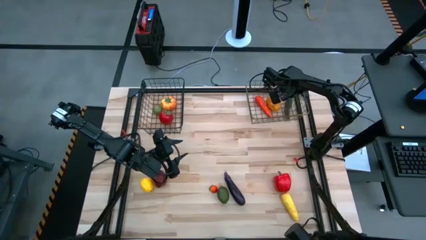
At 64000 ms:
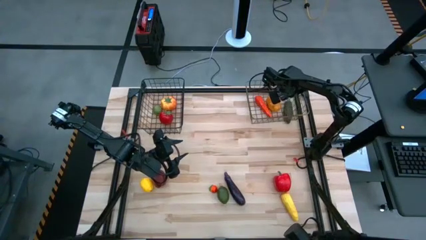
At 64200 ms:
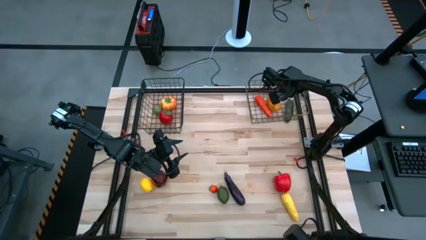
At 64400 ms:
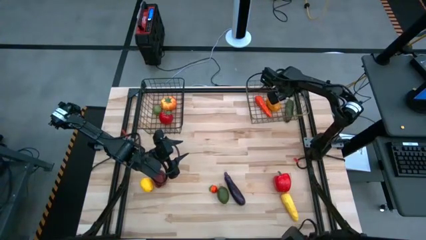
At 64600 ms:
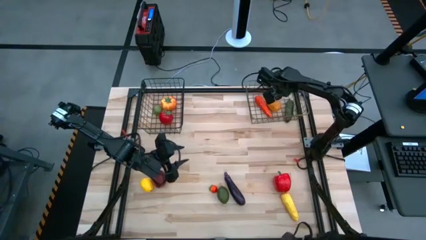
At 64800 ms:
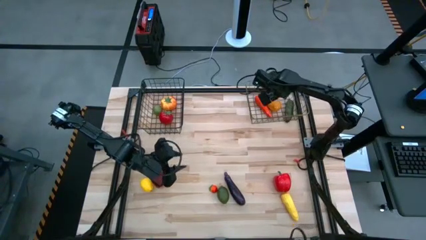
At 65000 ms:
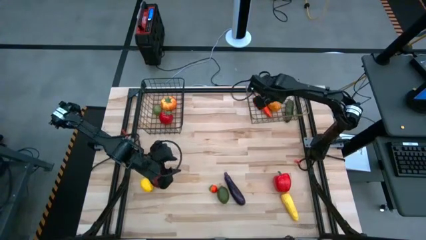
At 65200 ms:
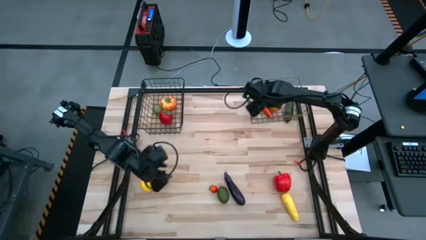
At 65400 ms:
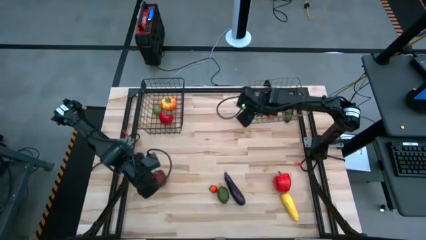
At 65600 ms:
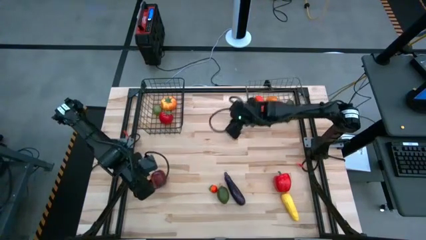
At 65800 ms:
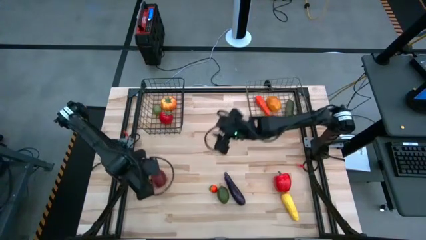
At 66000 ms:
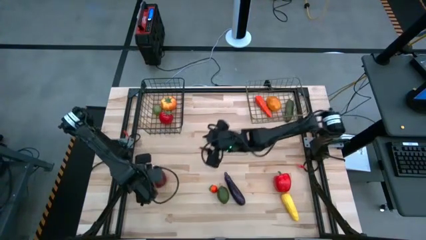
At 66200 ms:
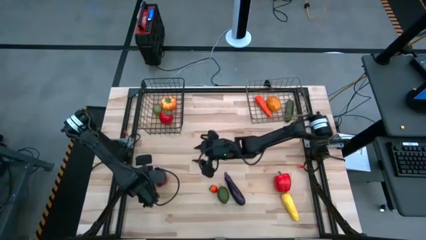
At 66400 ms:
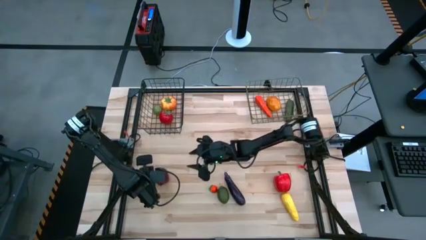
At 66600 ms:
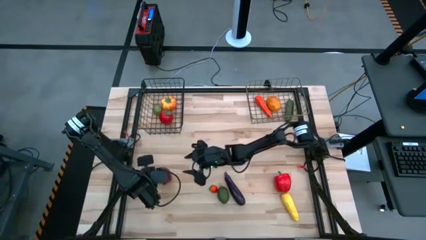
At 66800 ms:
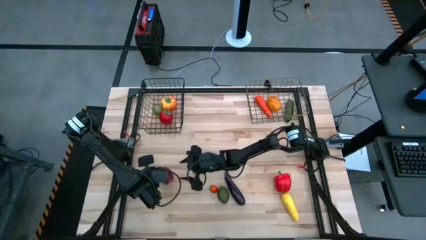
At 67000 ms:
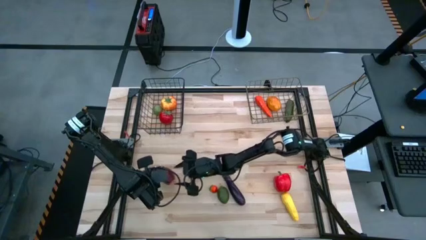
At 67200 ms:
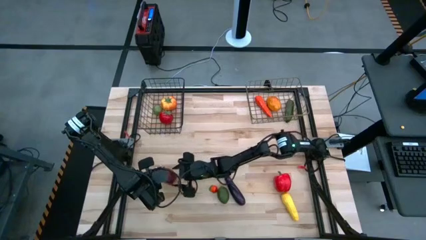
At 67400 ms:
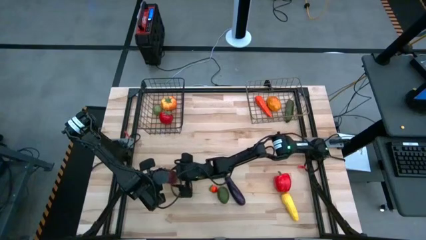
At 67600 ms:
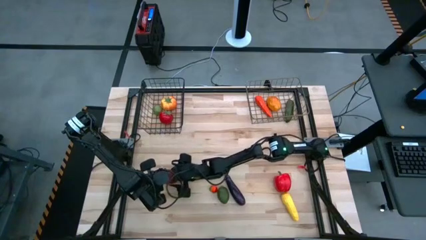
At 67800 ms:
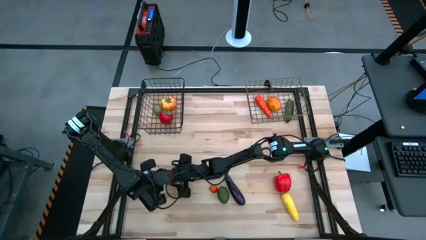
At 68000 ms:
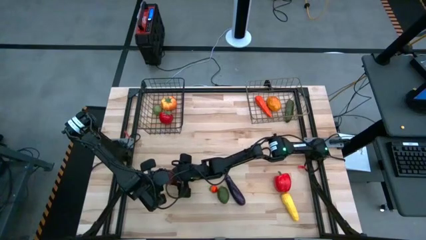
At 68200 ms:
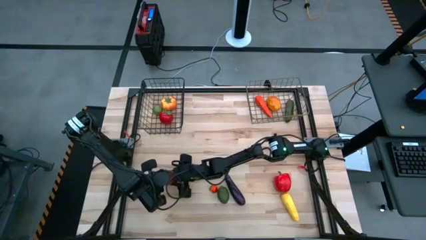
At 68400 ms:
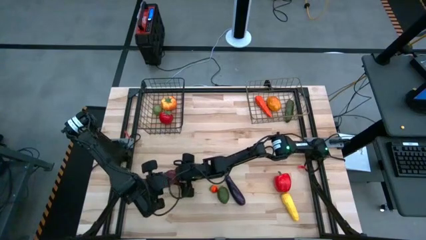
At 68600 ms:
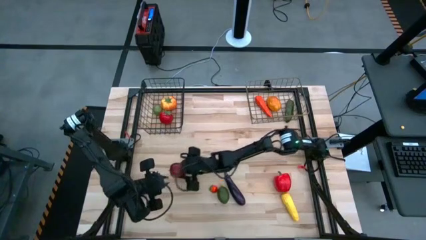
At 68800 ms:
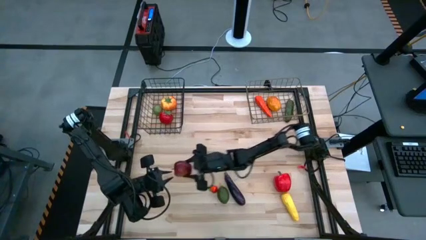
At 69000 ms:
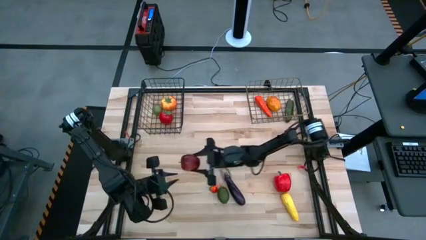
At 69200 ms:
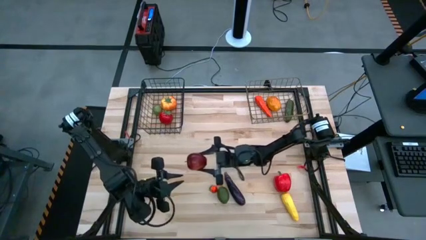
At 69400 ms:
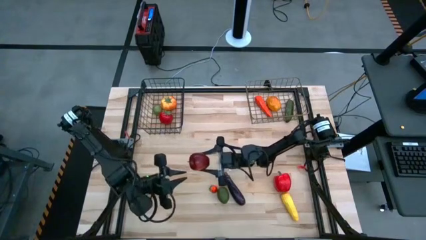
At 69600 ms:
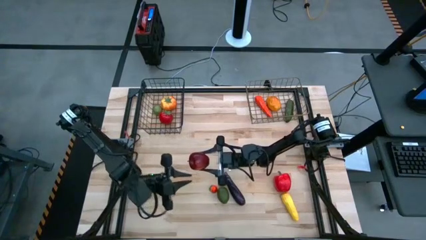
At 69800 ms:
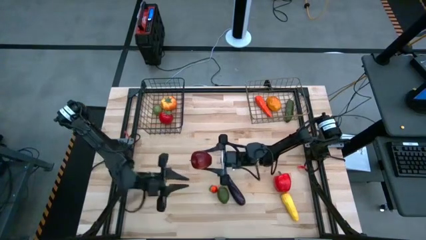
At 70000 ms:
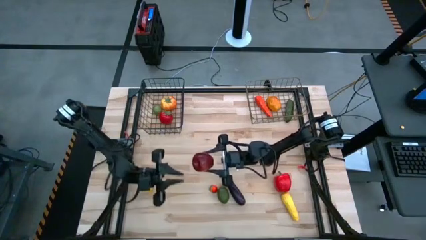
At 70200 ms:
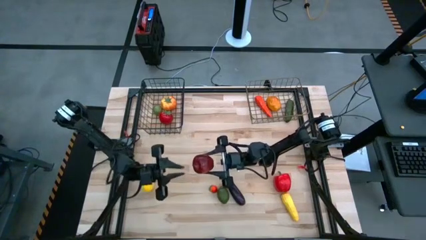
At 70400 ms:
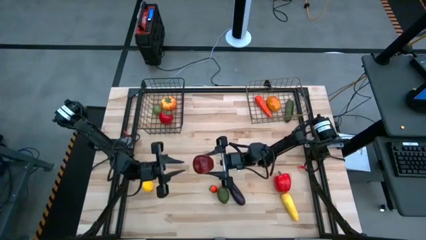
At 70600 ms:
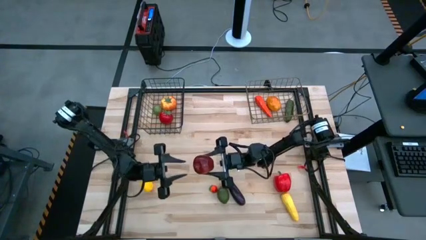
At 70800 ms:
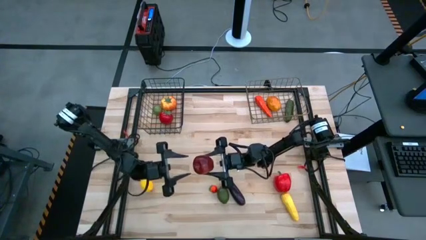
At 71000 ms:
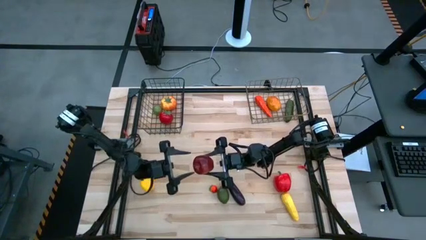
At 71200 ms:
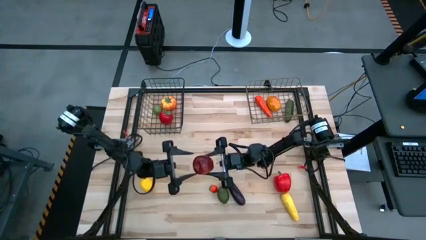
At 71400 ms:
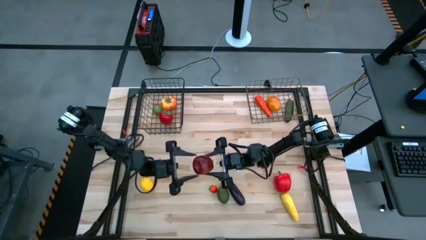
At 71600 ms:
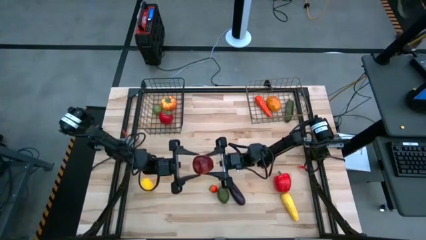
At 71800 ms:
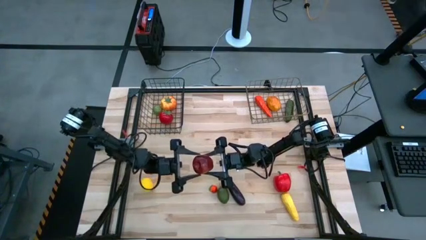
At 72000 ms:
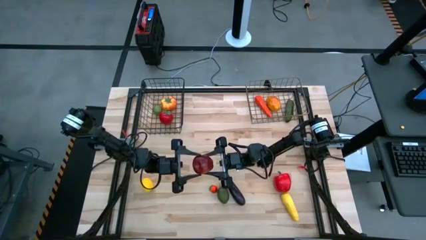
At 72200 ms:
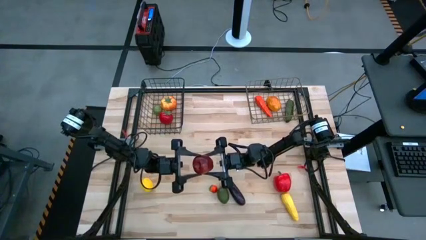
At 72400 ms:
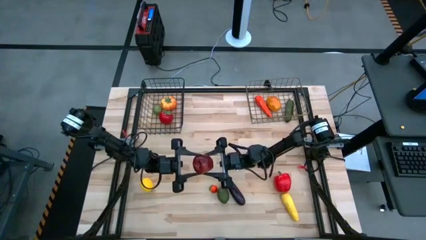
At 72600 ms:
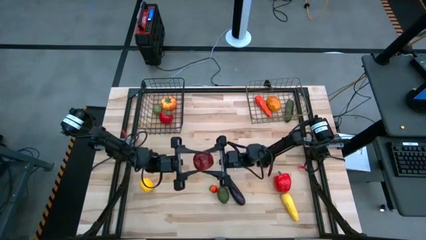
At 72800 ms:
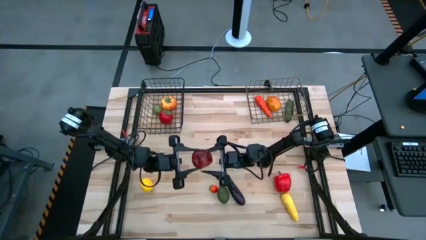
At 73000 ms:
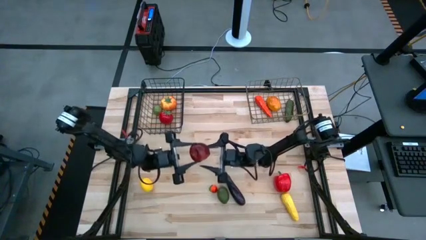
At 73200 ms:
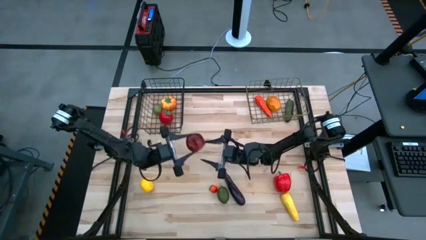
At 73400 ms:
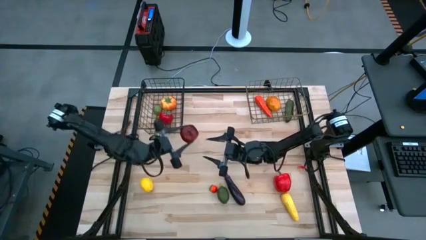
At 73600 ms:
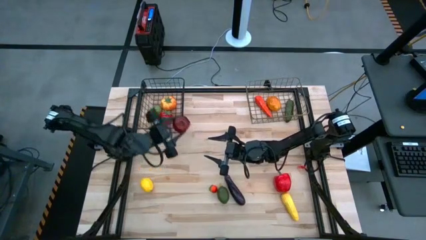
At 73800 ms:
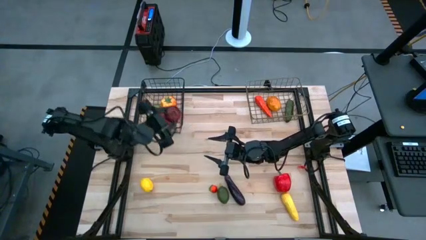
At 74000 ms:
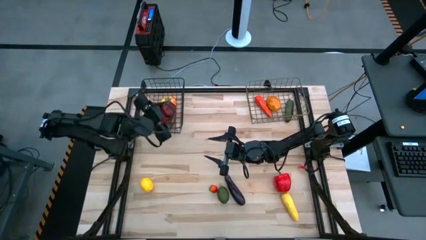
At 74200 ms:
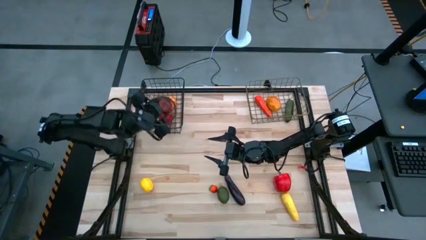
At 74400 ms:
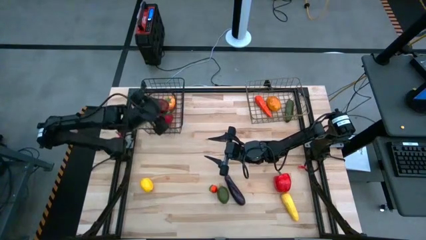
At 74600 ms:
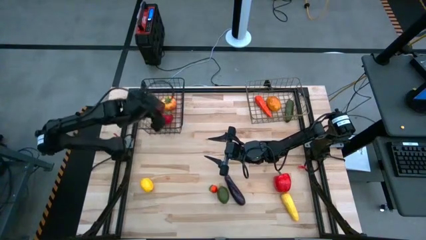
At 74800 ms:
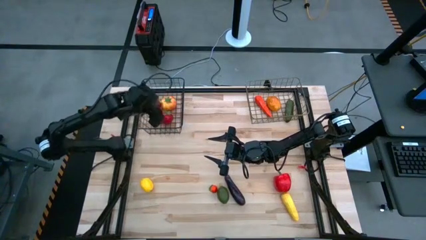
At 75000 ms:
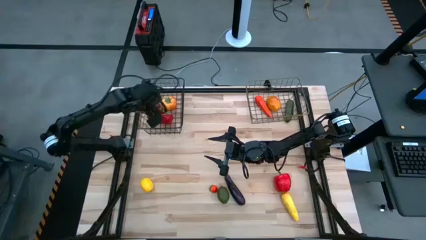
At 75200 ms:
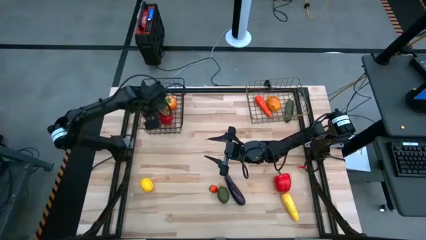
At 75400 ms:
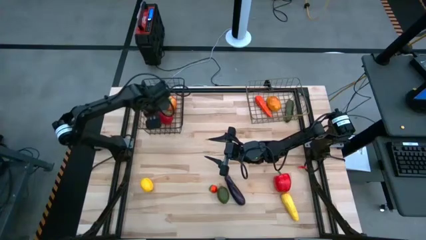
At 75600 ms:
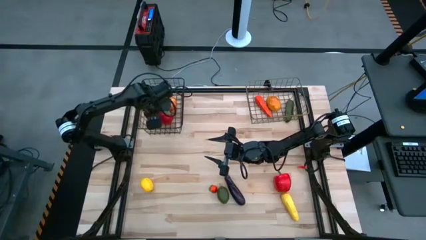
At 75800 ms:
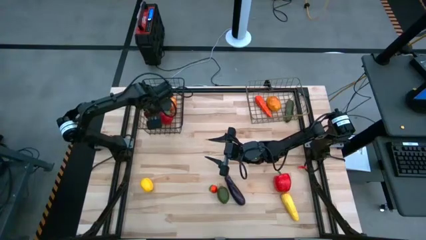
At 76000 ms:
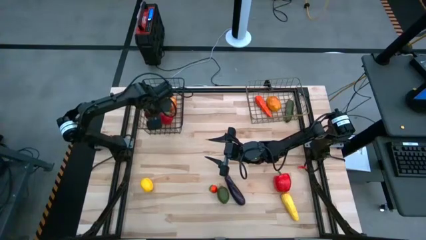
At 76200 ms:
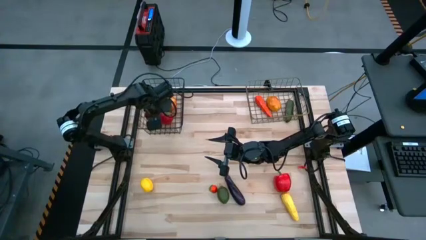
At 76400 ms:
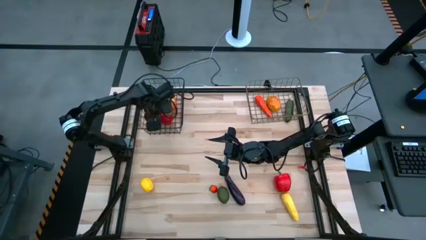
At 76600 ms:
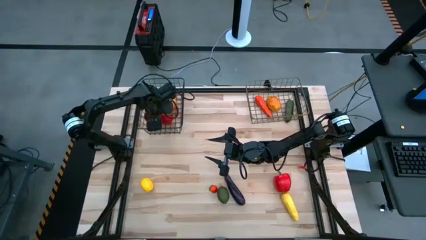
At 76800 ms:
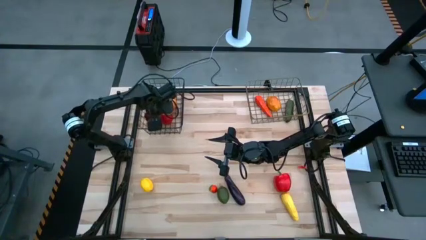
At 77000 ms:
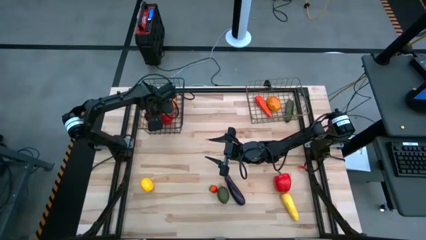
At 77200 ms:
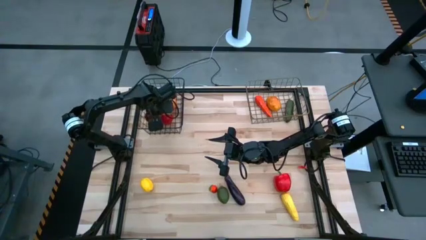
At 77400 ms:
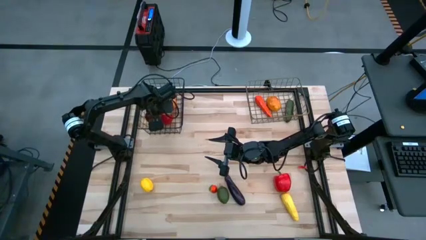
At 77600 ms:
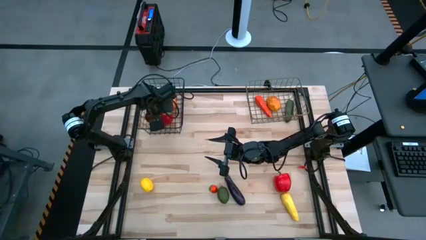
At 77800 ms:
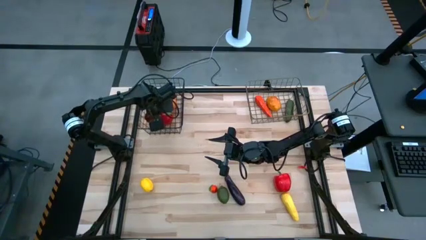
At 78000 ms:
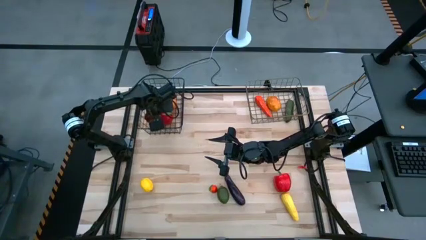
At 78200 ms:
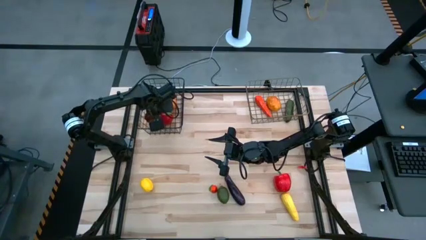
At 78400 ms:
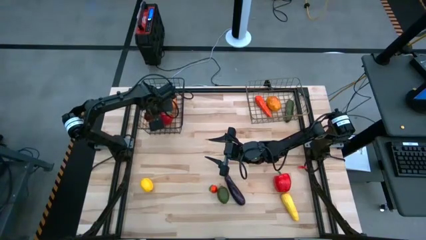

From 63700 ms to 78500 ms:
Task: Sort produce into baskets
Put the apple into the left wire basket

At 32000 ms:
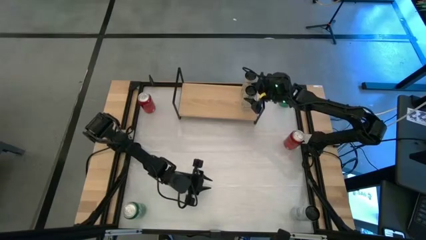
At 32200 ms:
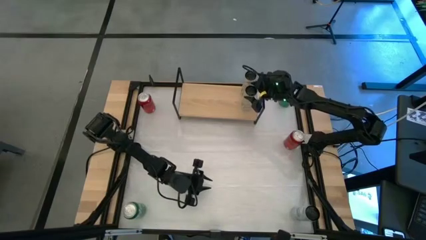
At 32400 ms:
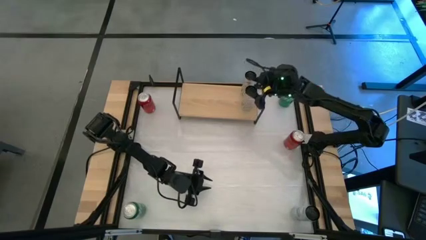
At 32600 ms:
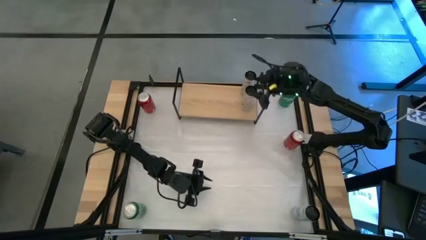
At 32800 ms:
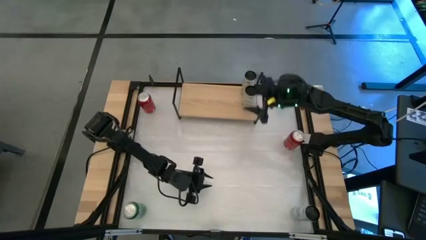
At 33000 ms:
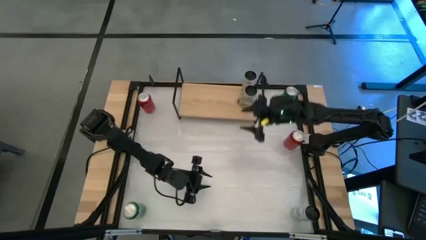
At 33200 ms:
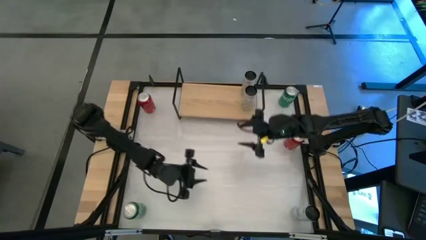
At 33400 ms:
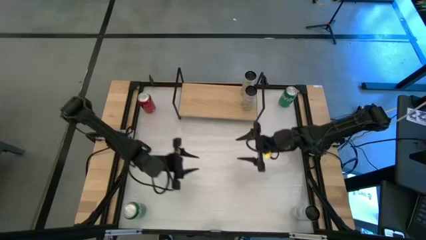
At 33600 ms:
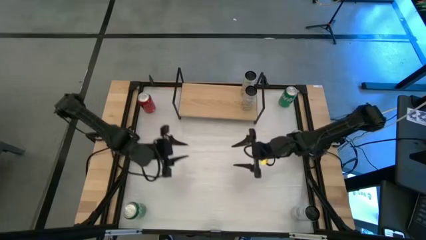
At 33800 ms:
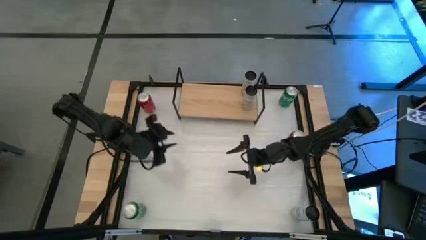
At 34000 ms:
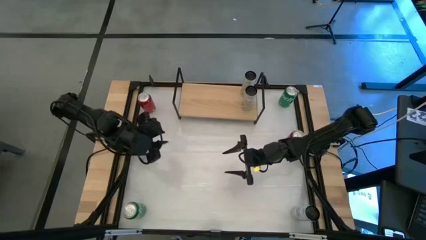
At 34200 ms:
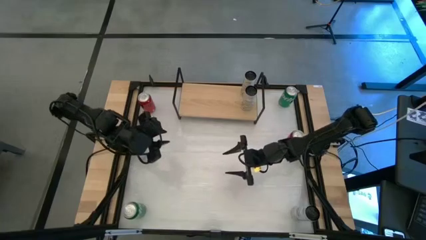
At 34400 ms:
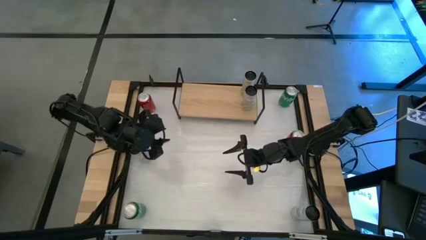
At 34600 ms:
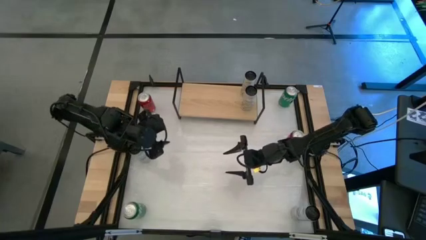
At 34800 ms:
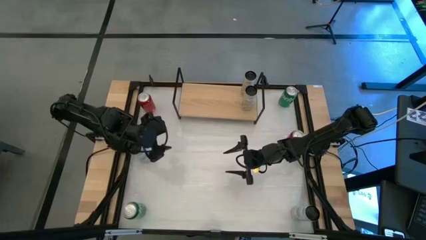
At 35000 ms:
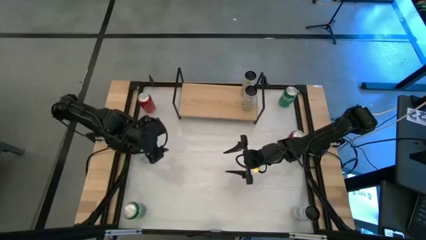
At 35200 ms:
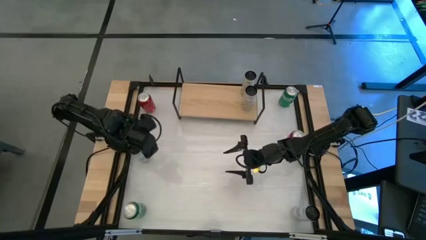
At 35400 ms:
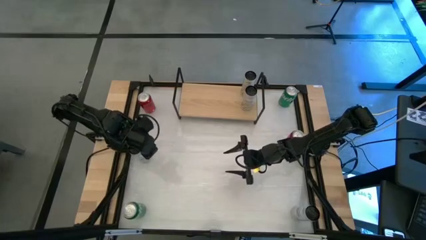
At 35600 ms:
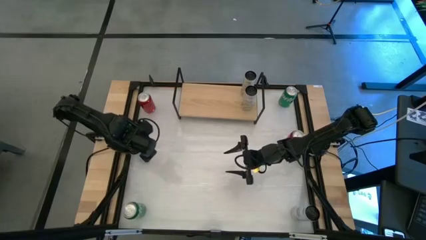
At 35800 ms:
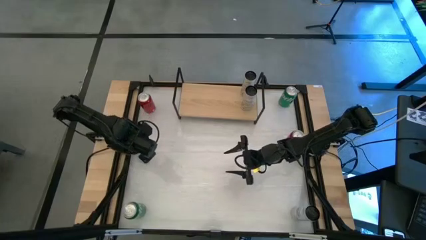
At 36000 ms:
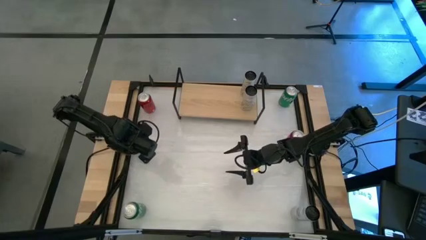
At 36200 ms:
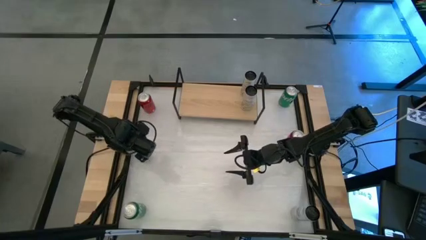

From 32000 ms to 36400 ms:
Task: Place canned beverage on shelf
Put the left white blue soda can on the shelf
